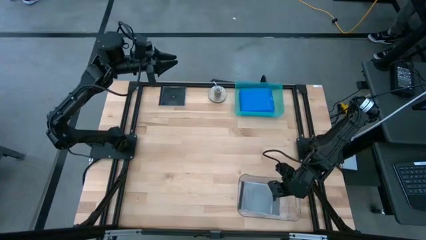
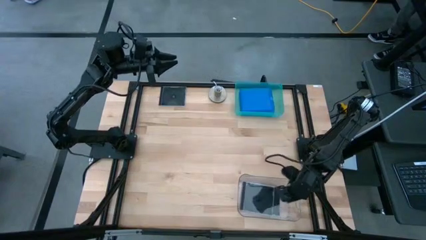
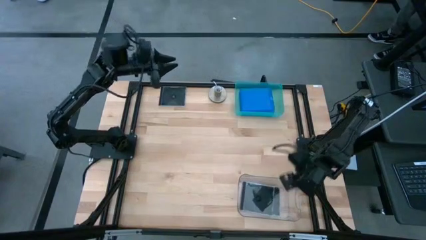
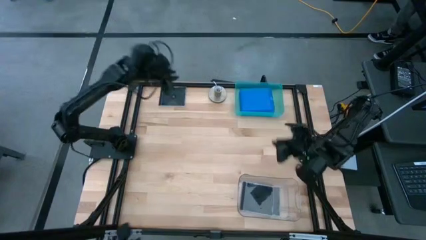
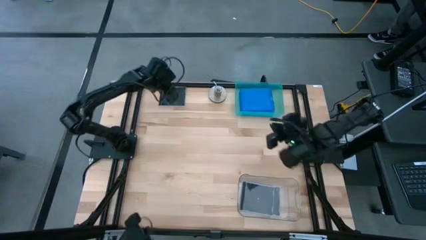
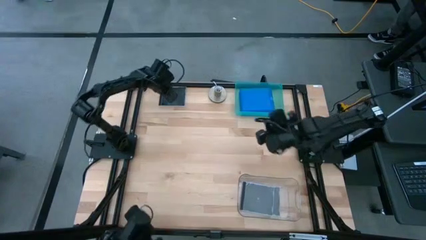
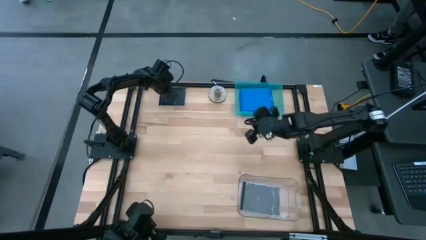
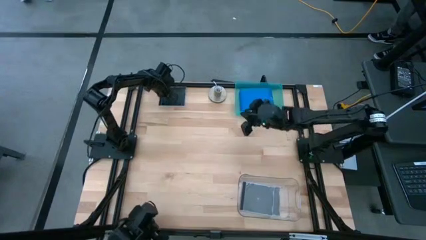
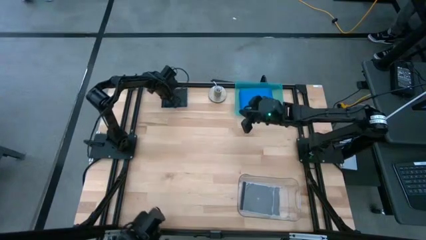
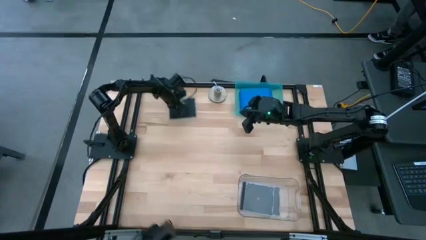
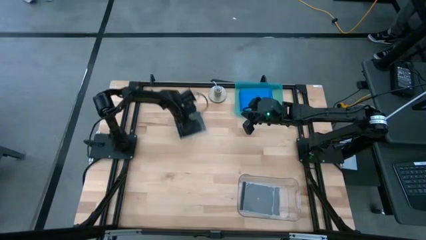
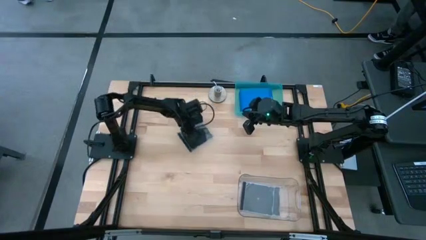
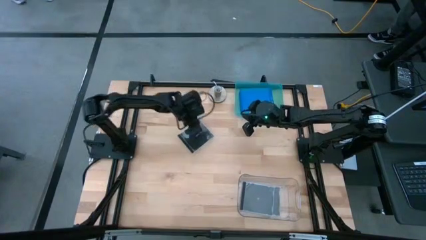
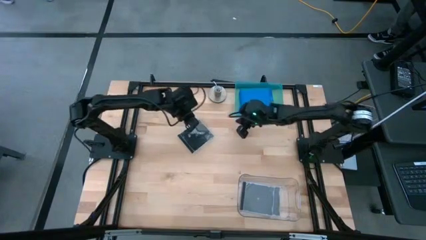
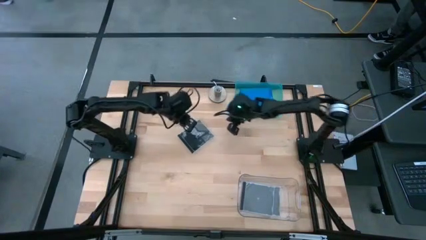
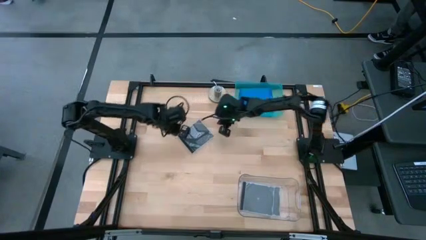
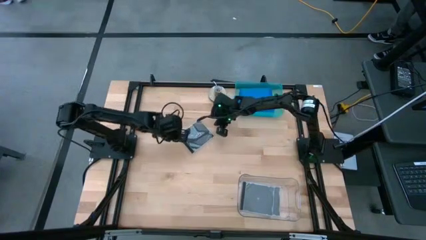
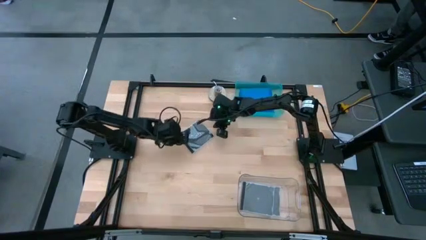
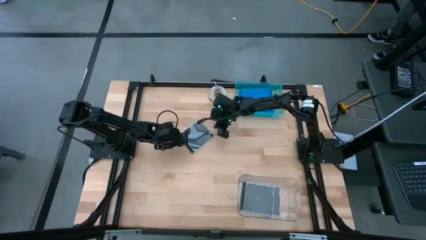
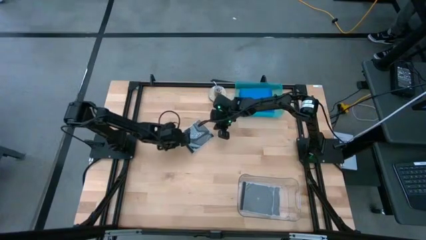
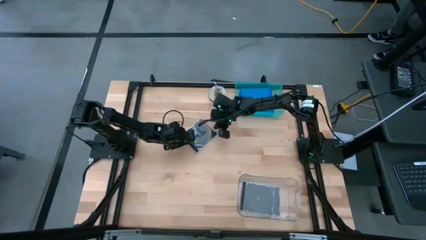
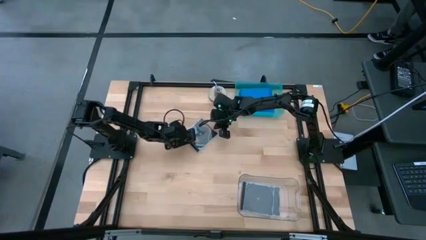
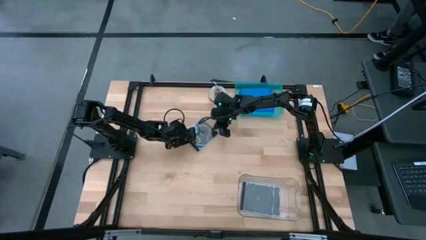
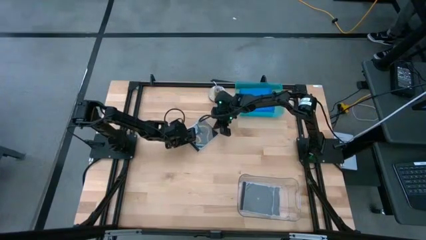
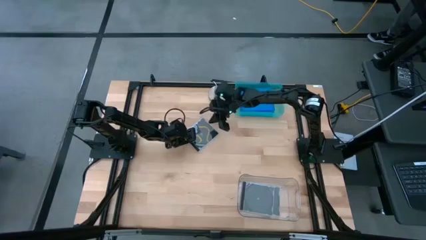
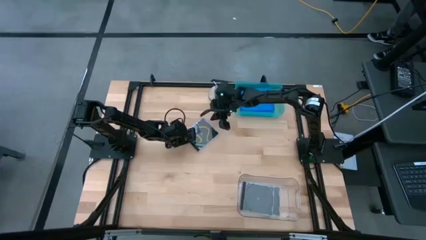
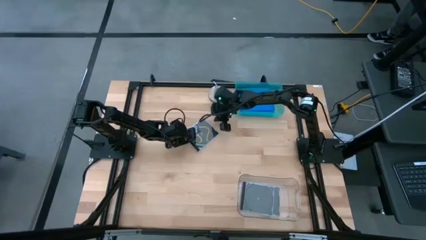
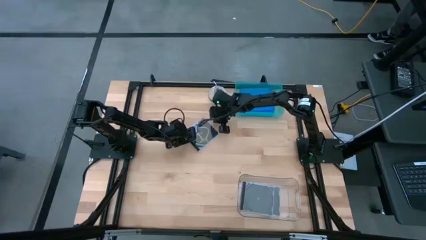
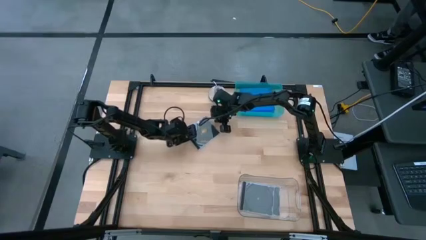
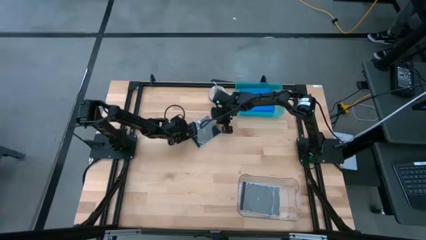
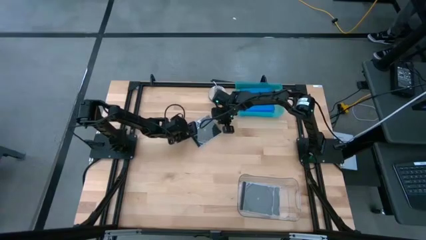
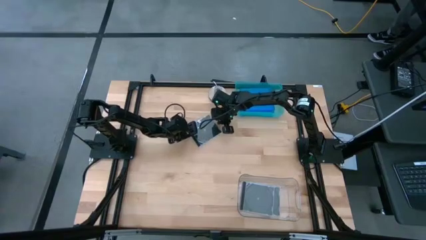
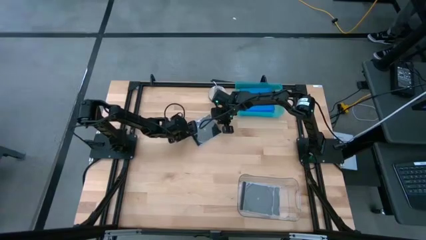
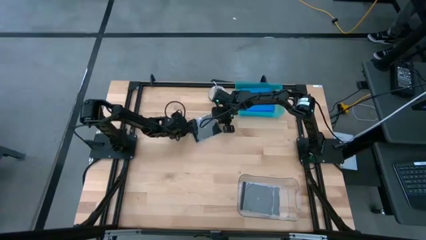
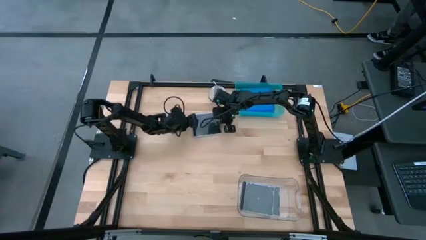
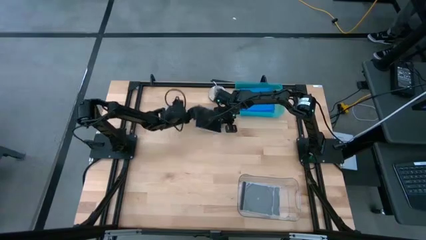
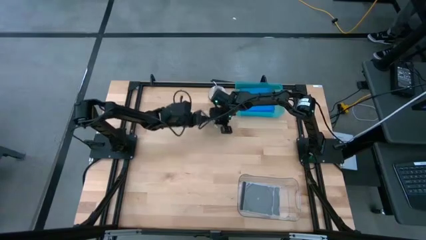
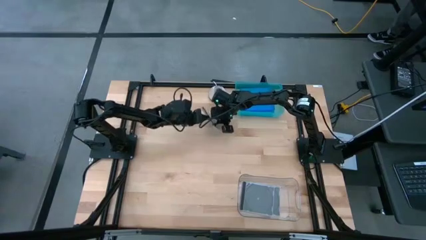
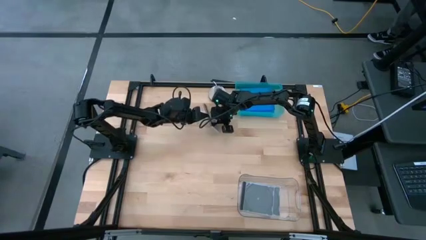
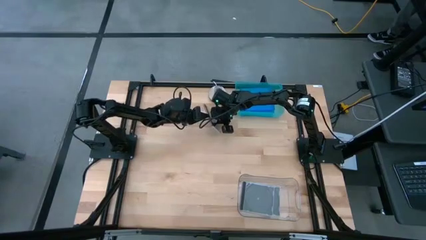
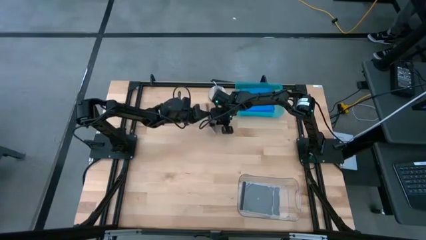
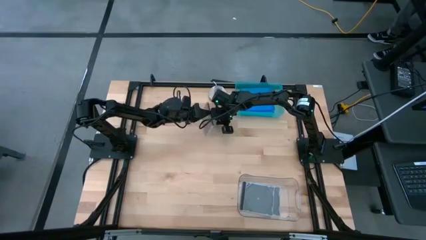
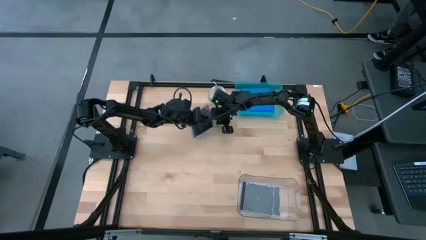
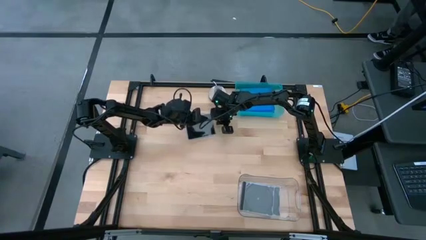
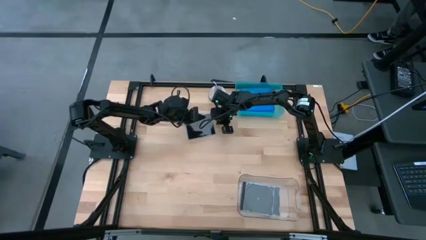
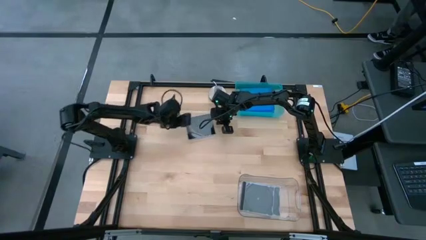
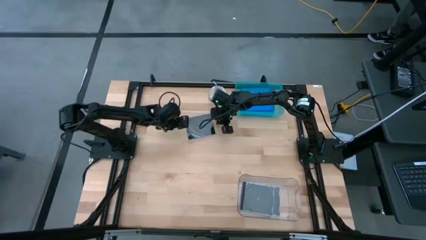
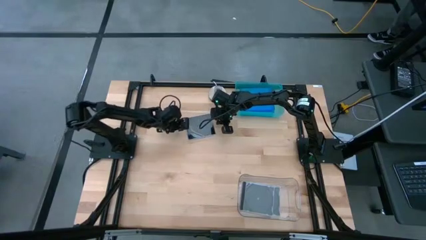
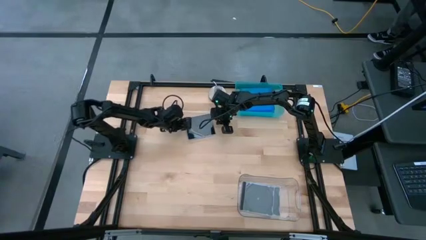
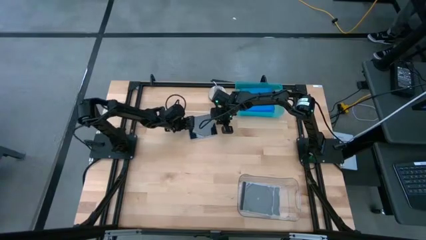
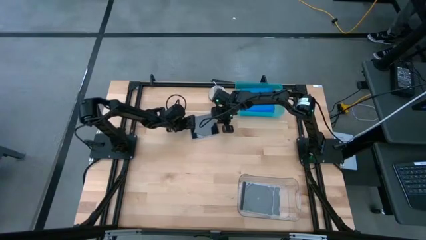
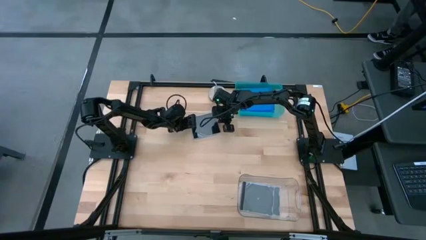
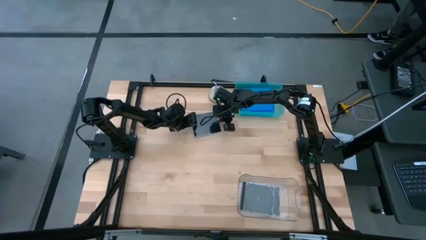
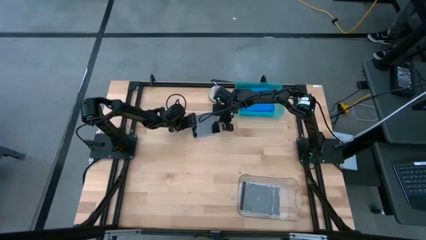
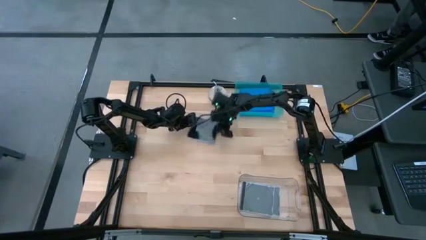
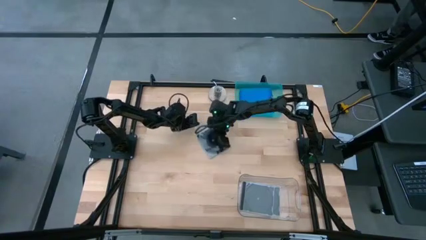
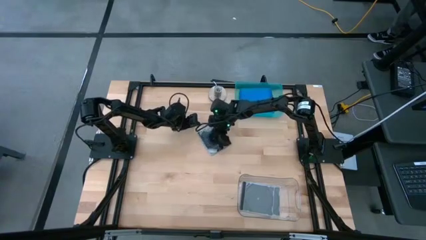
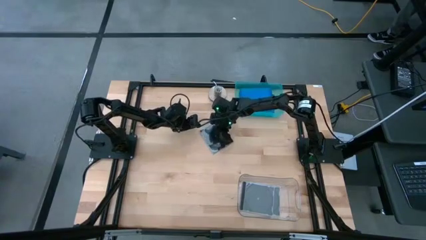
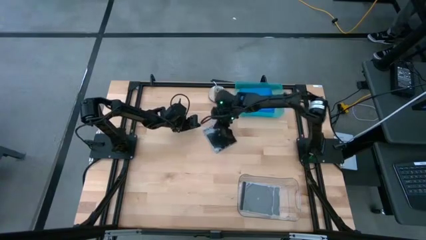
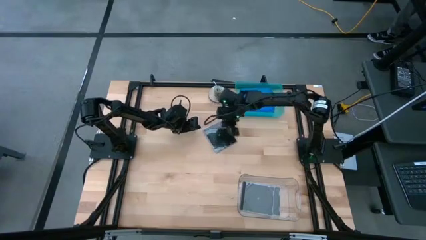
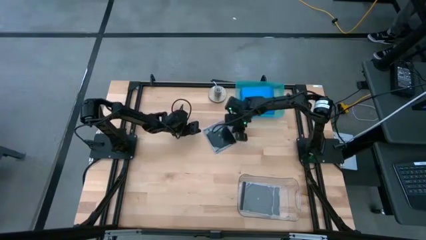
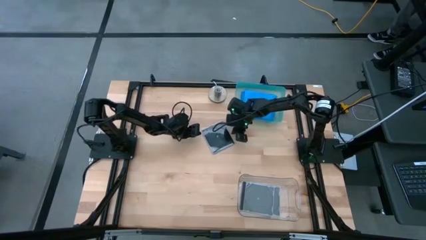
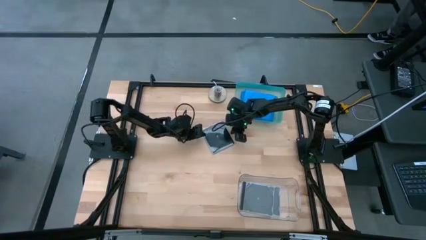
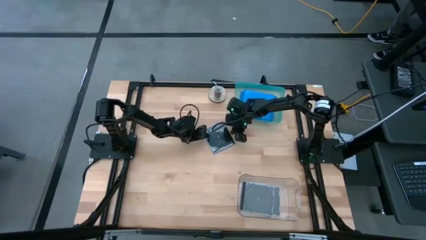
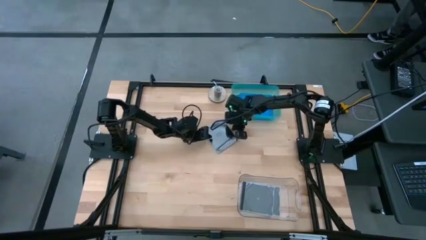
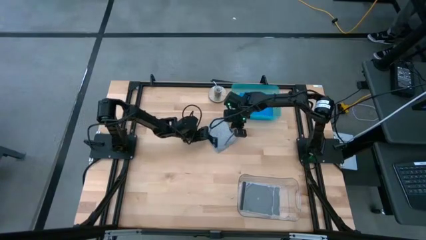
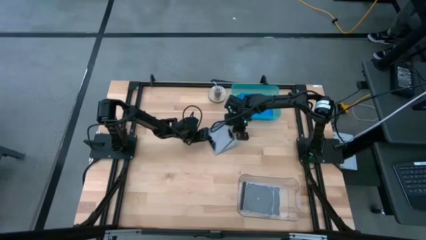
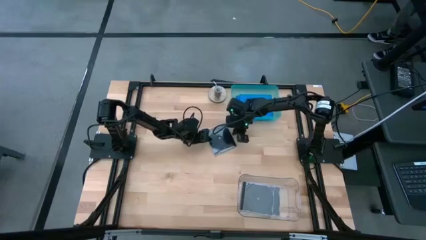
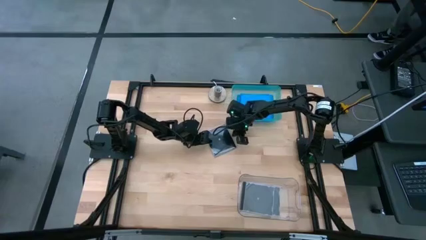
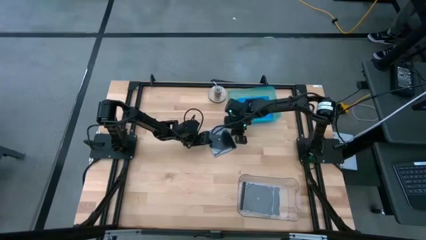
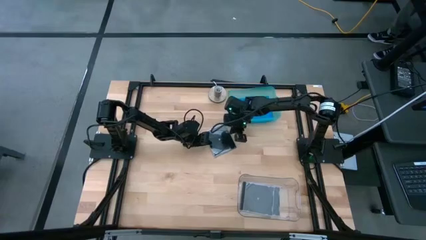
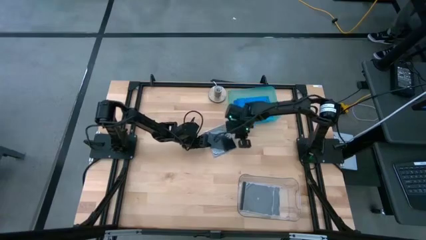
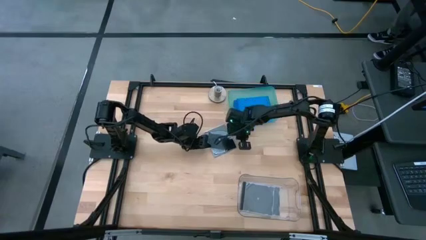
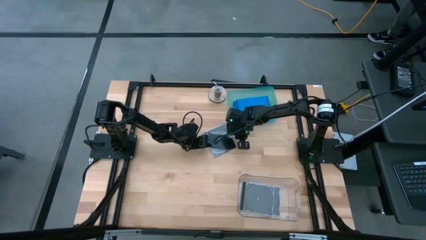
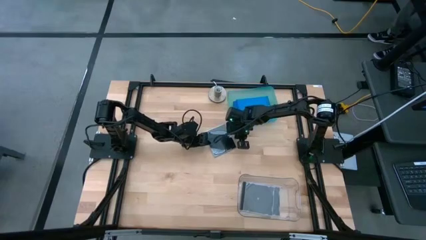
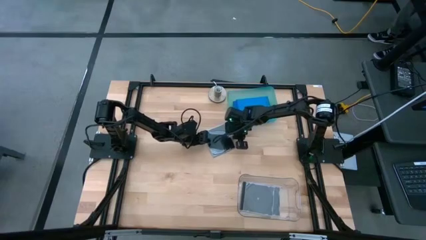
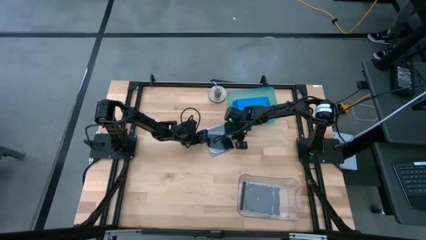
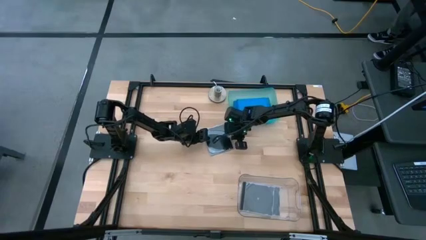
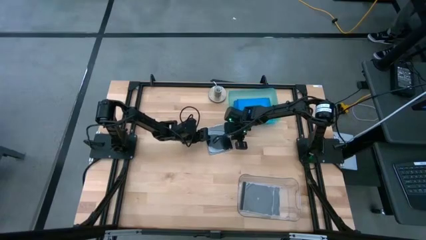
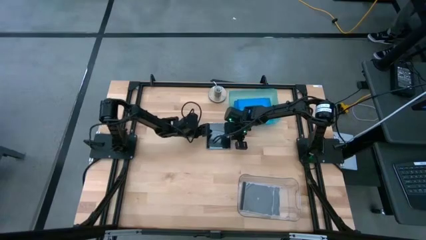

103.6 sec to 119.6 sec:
Task: Pick & place jewel cases by type
Put the black CD case into the transparent bin
